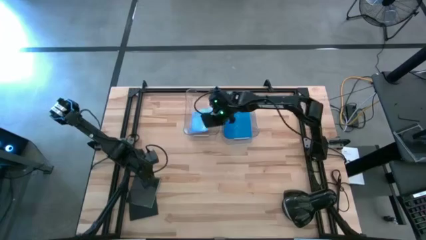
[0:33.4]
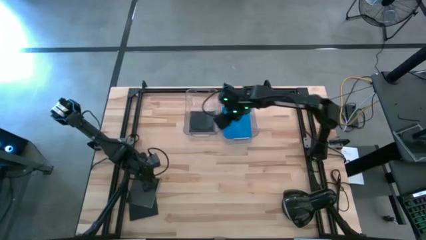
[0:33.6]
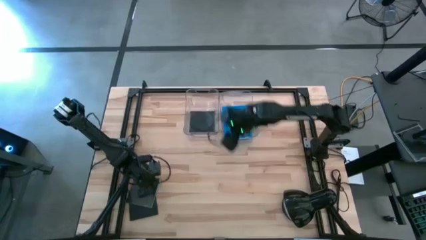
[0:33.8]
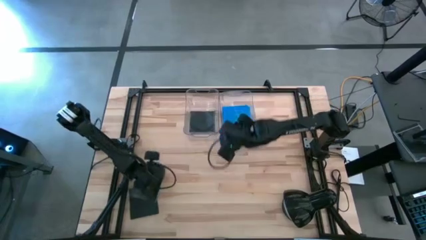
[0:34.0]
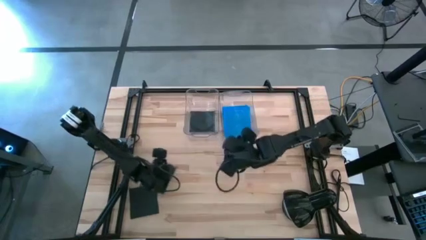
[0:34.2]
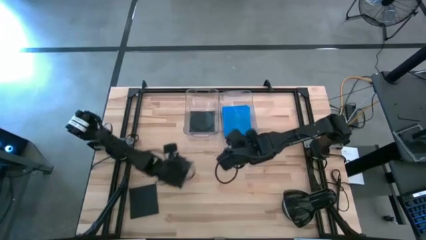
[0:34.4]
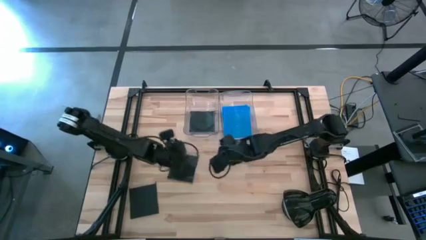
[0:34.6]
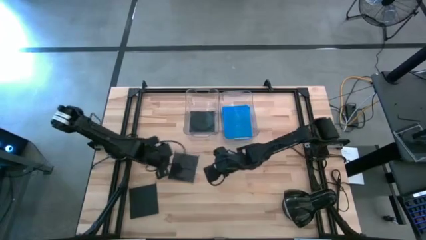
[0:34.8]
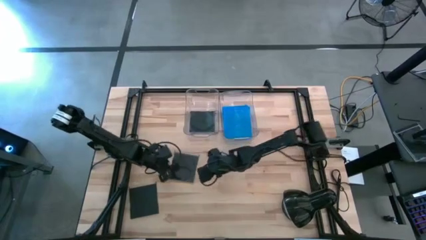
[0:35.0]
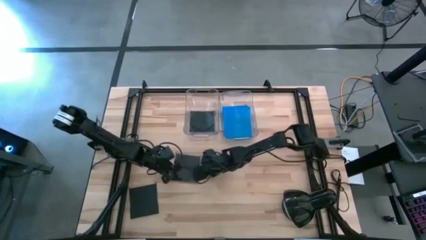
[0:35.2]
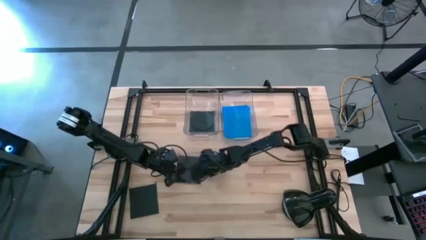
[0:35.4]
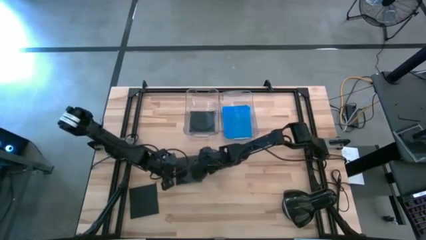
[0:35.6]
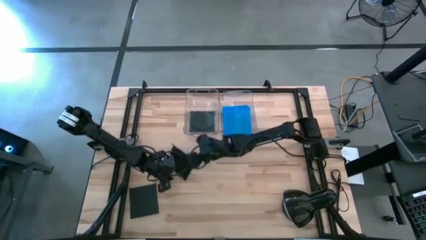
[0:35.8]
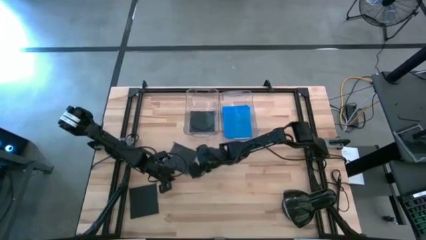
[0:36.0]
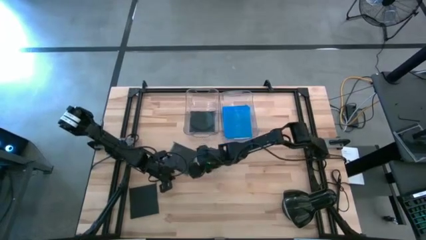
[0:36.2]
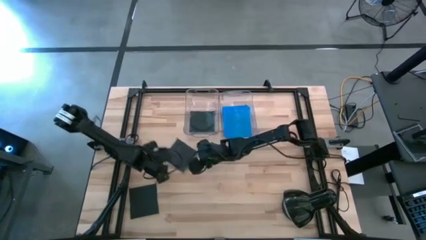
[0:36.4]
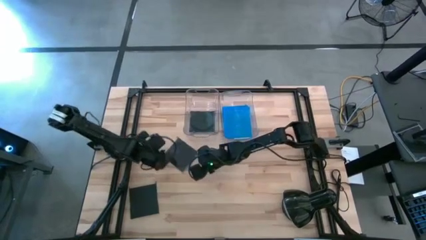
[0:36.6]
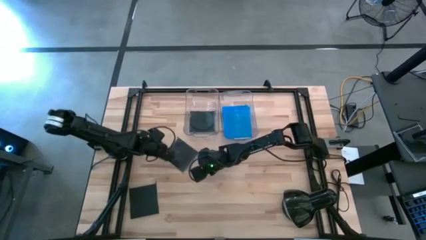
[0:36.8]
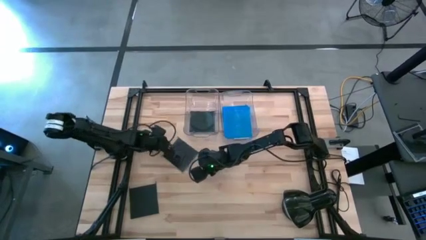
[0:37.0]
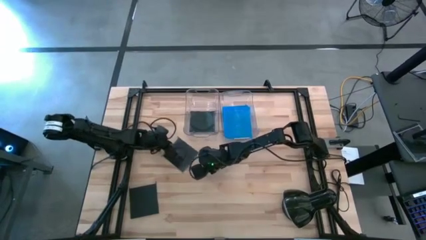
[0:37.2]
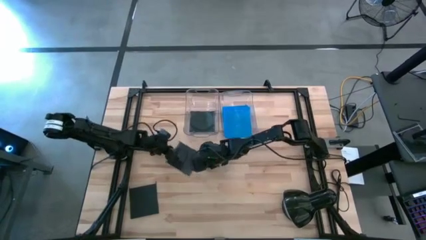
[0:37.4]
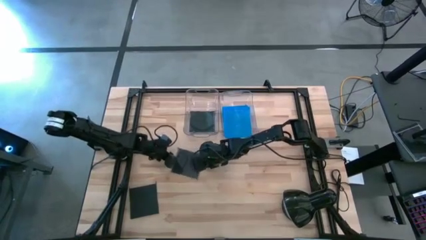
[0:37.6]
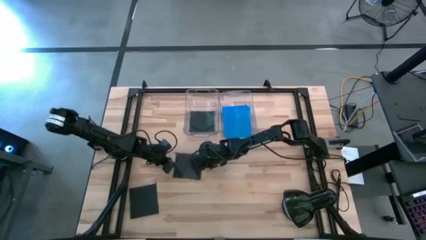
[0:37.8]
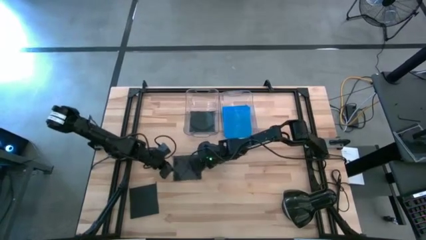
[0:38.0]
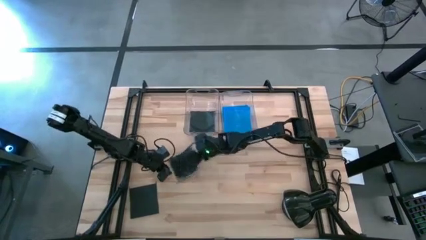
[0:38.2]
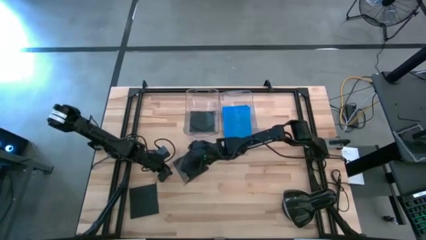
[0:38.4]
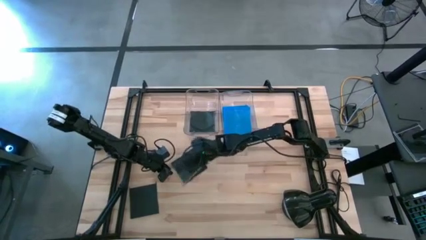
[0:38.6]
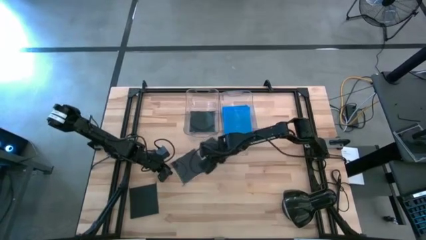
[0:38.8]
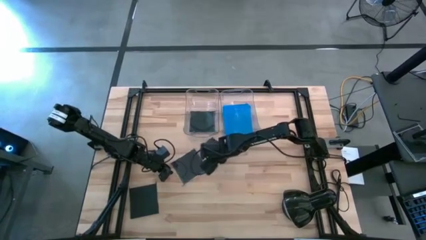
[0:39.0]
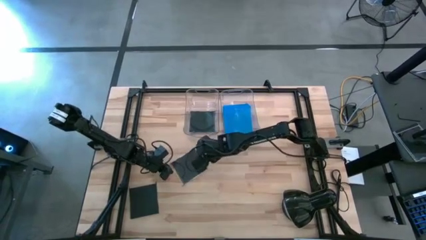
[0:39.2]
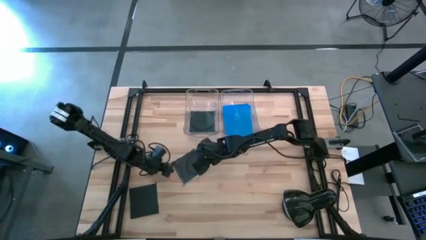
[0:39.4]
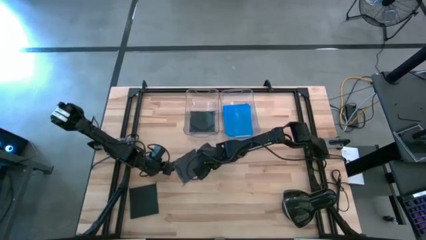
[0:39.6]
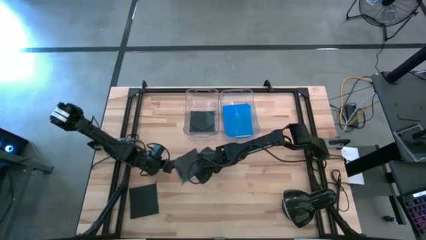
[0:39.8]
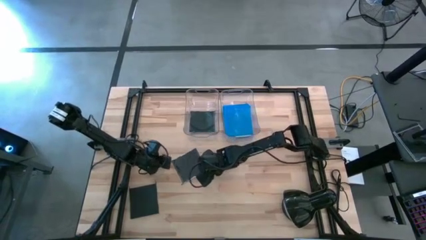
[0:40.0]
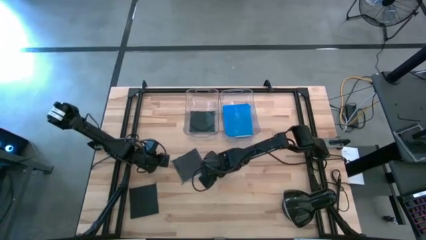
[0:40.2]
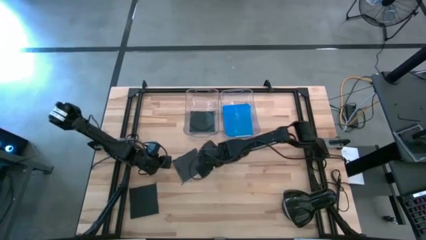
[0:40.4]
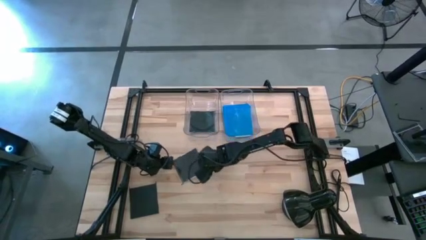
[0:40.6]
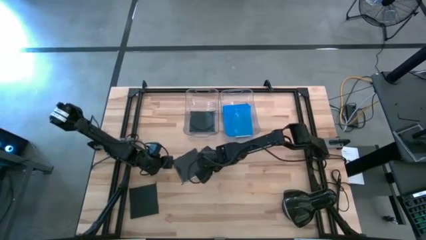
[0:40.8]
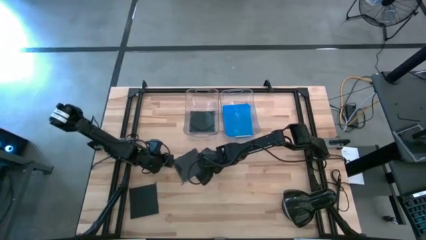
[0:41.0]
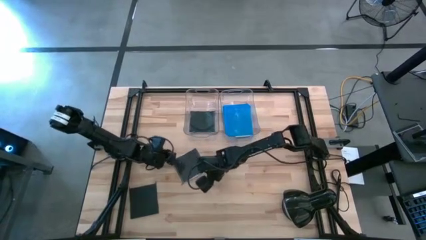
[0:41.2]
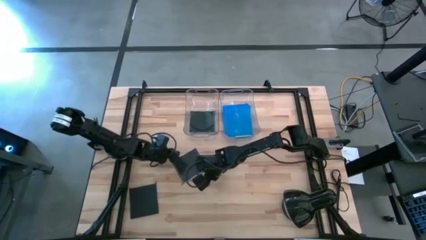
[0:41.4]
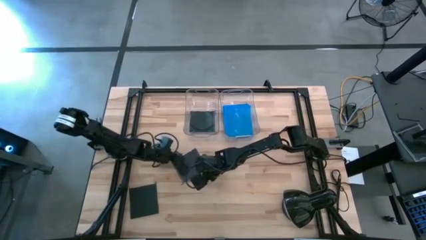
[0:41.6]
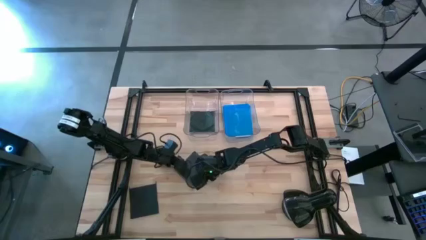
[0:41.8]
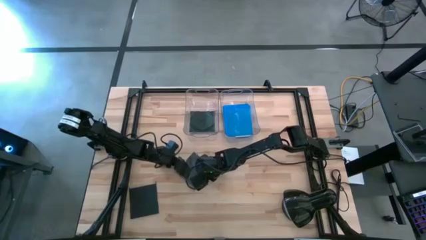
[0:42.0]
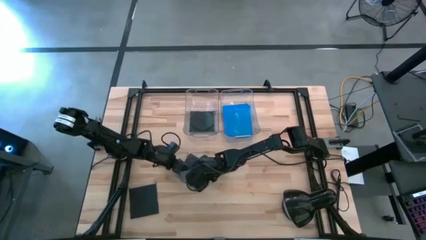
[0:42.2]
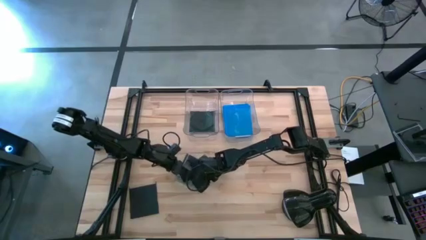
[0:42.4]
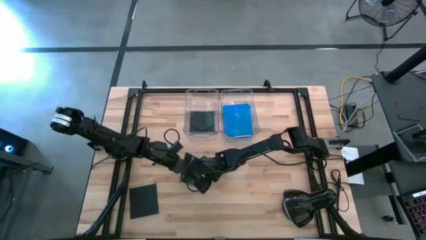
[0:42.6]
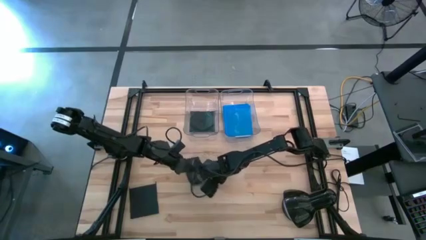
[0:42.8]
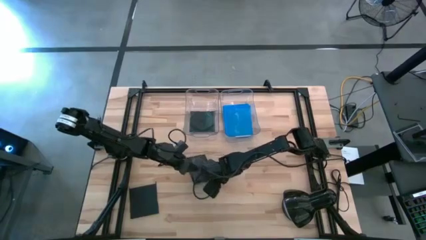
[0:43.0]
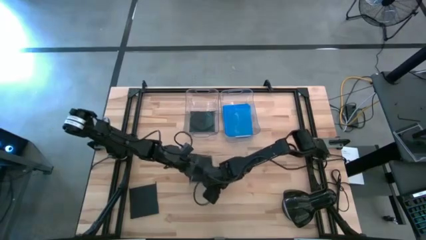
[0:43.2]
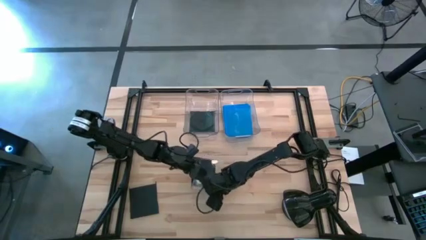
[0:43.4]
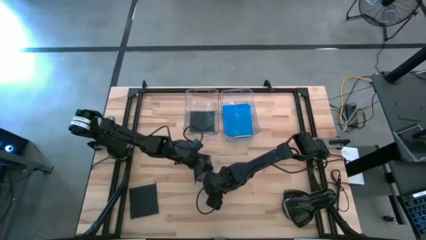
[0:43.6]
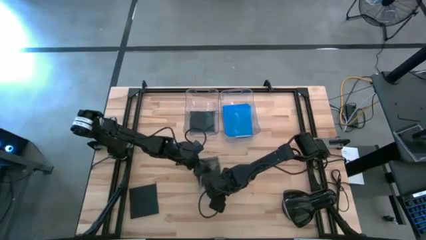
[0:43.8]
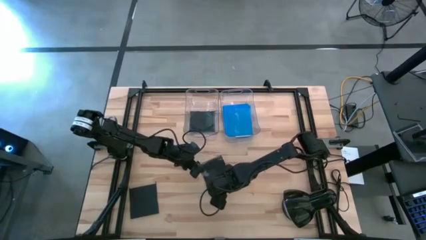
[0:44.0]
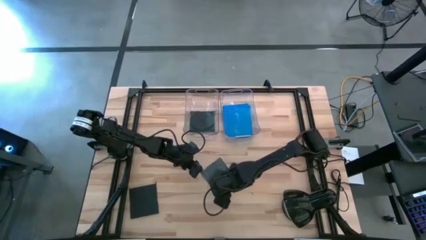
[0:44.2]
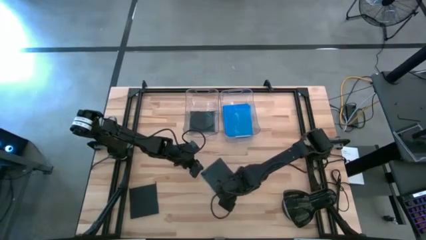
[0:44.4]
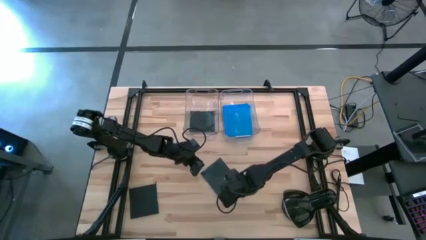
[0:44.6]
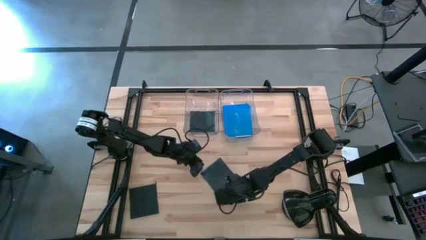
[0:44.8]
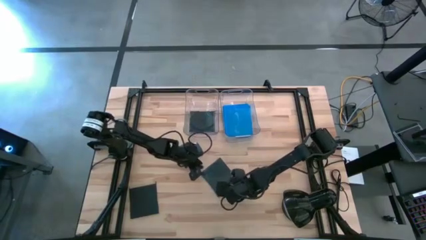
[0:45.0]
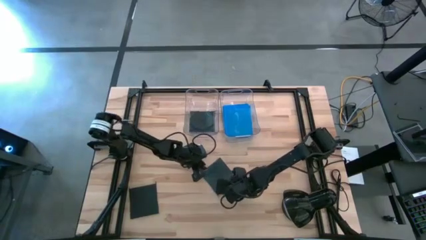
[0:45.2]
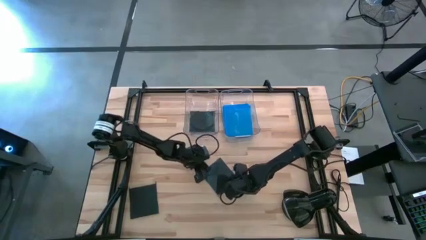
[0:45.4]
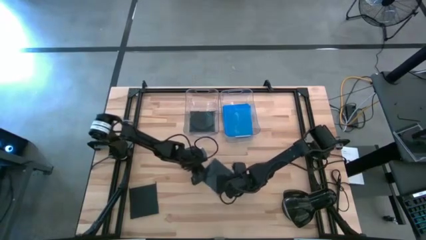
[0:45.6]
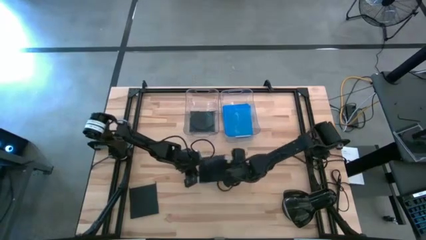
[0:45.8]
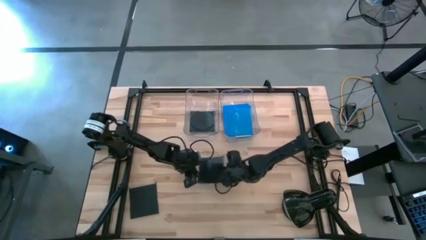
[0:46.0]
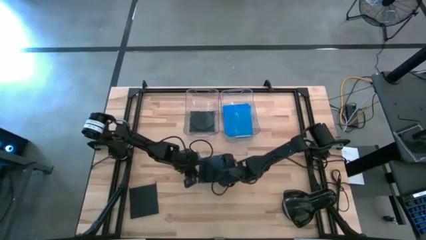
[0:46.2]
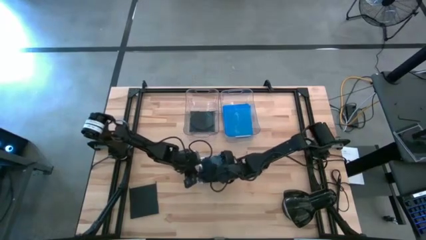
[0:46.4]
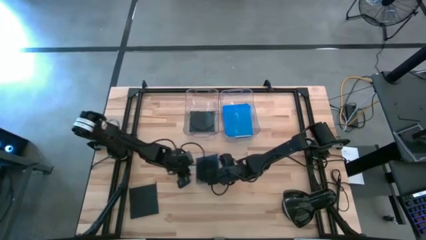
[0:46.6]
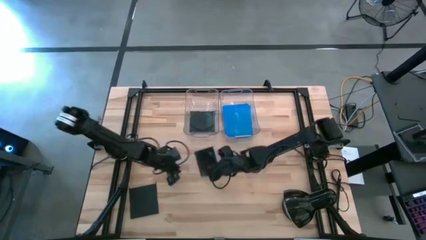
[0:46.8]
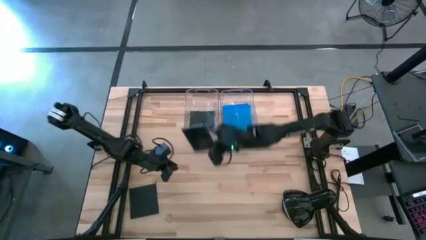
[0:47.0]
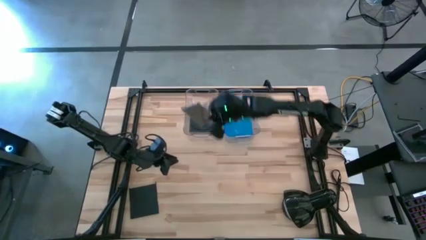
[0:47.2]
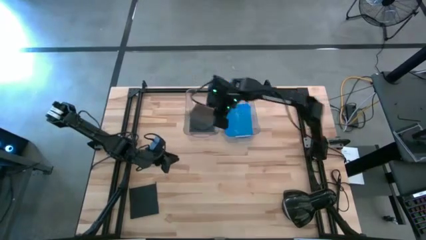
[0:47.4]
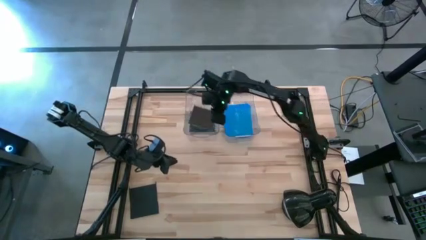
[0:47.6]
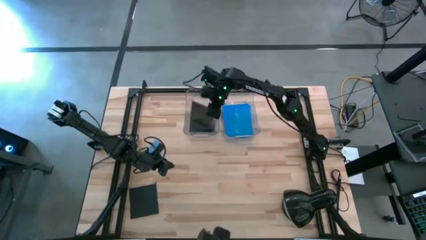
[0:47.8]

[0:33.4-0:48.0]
Task: Pick & place jewel cases by type
Put the top black CD case into the left transparent bin
